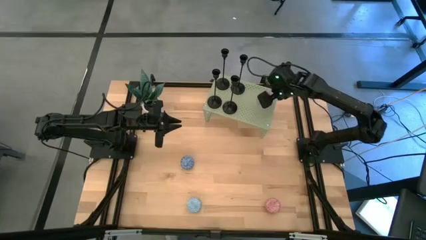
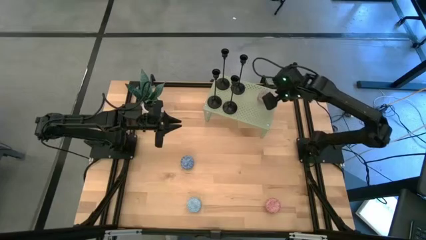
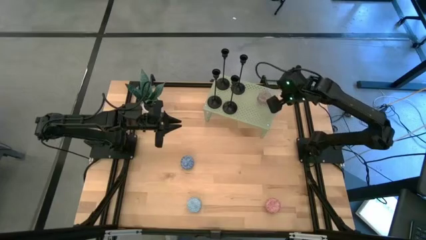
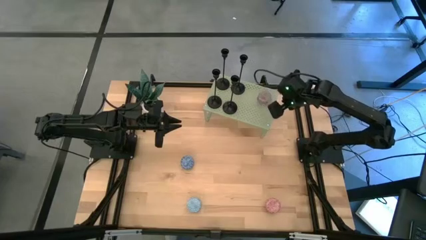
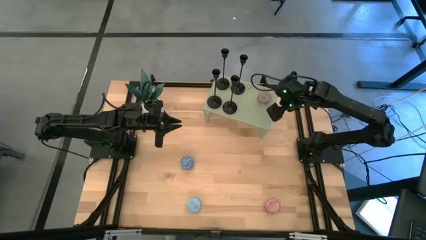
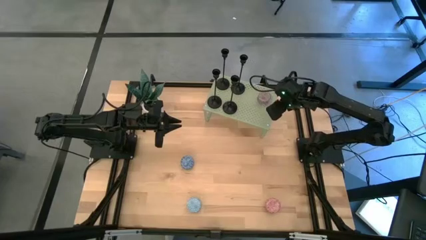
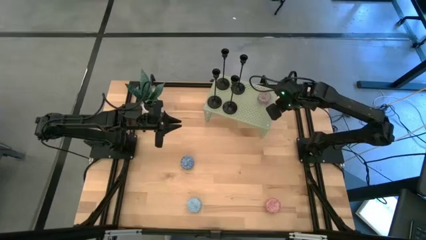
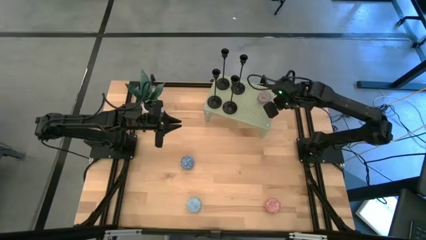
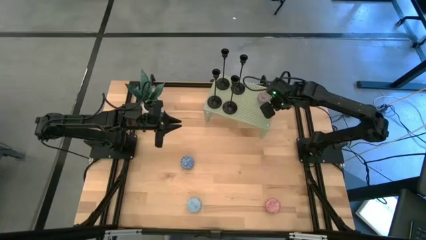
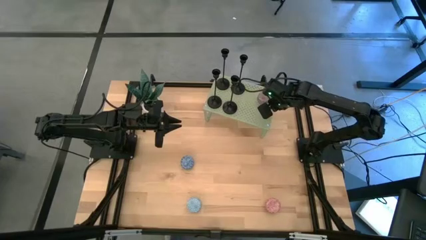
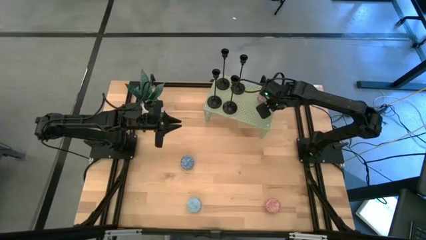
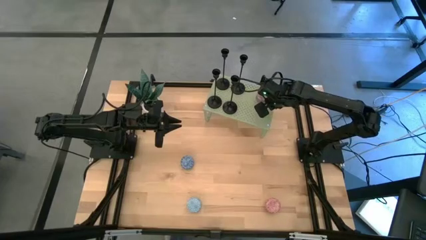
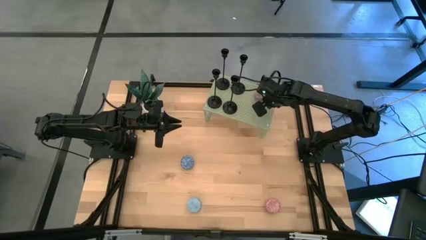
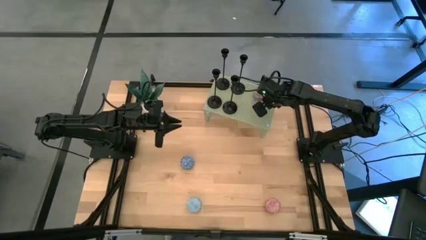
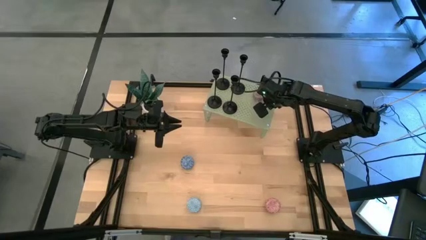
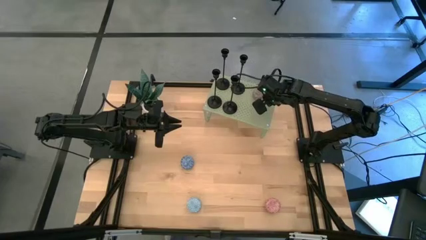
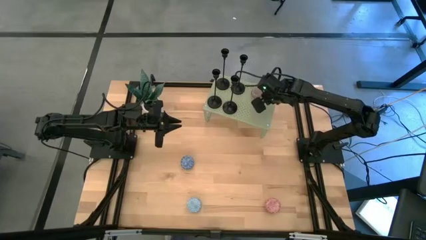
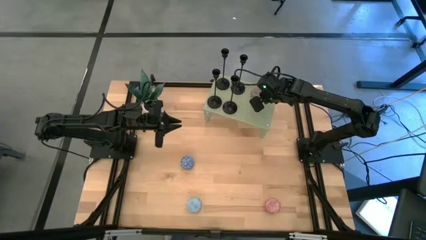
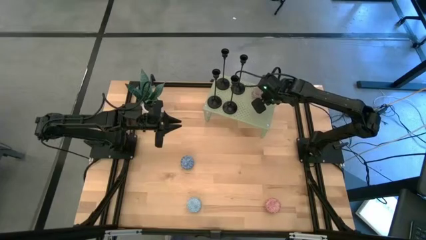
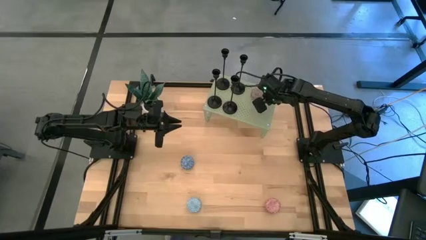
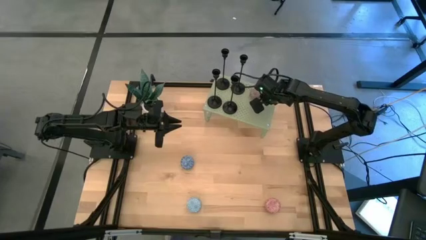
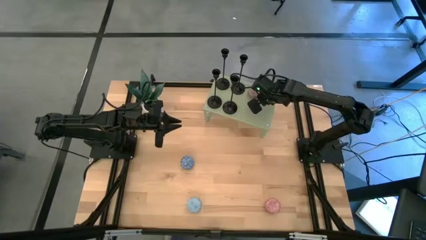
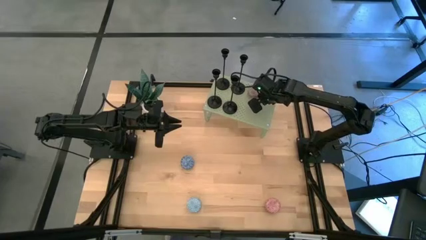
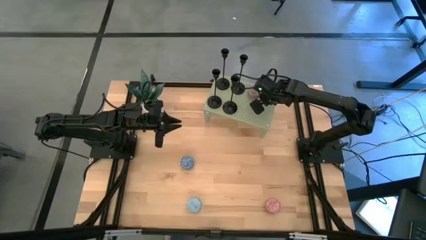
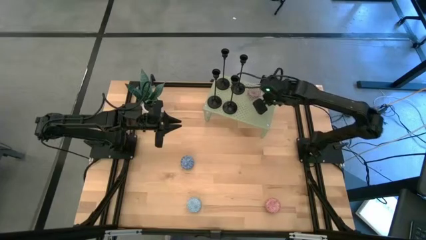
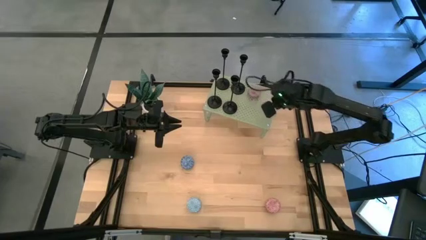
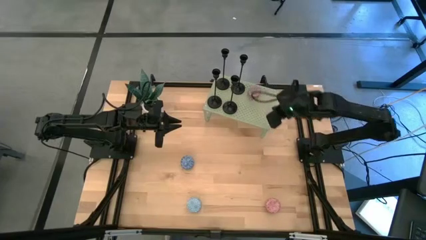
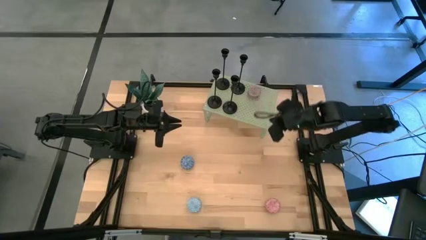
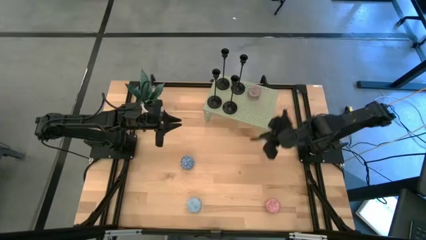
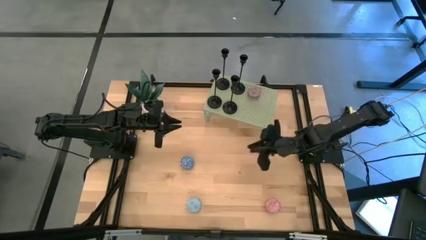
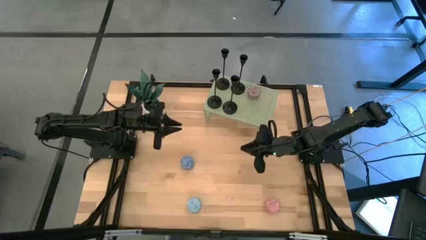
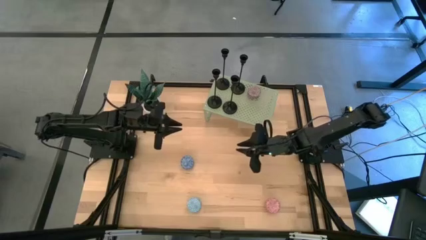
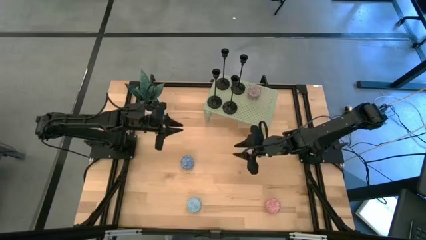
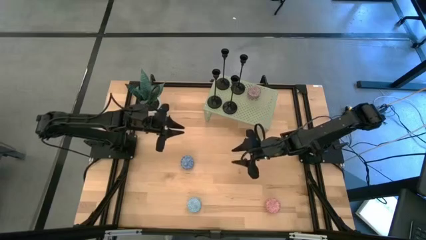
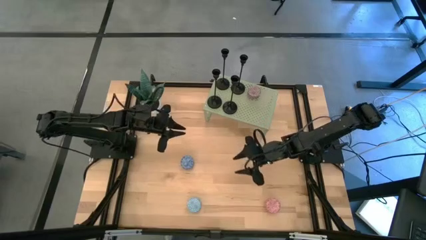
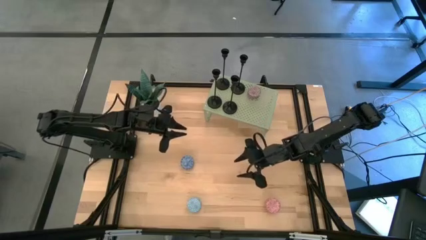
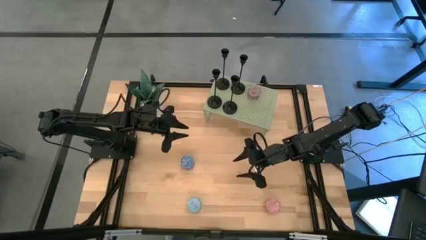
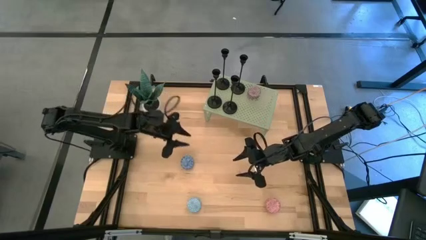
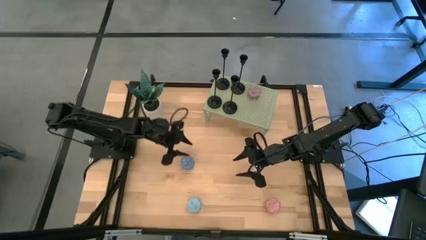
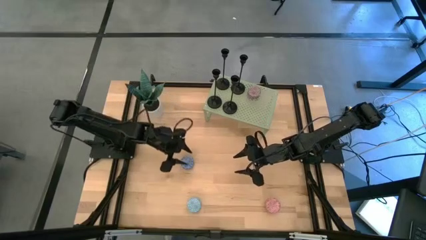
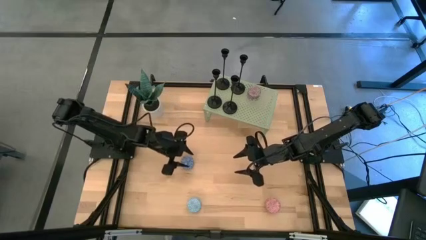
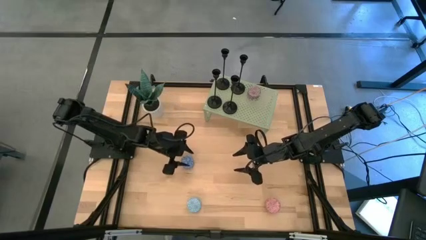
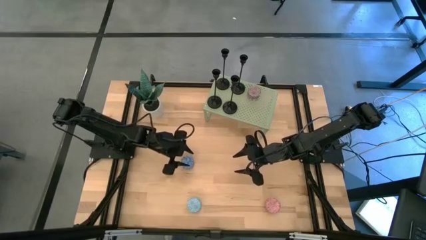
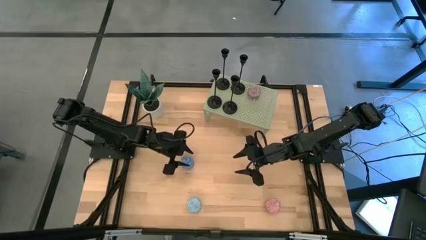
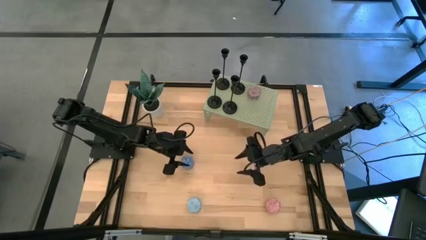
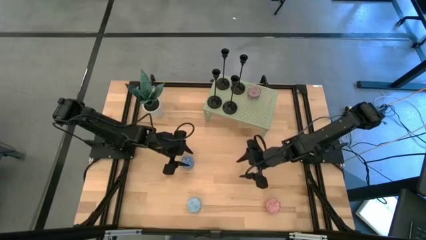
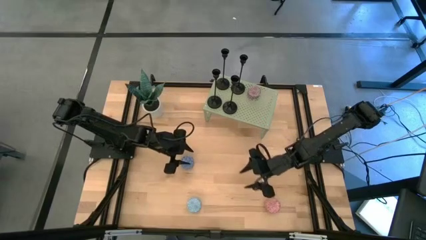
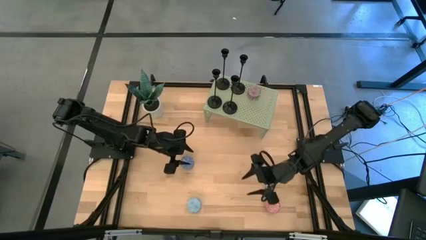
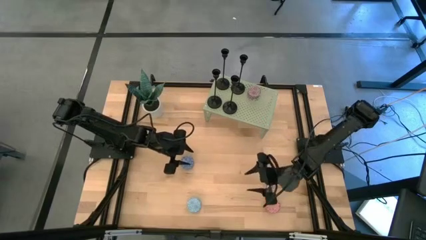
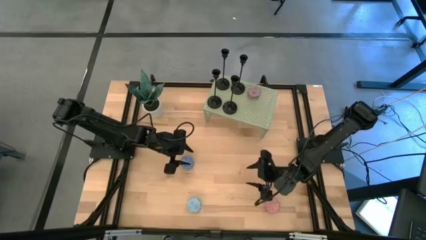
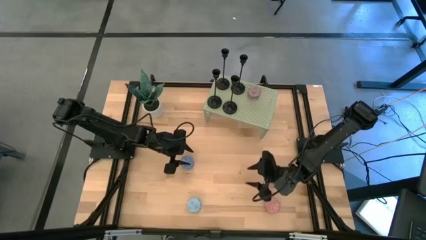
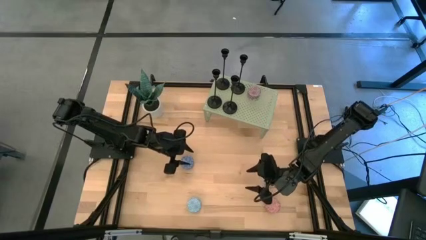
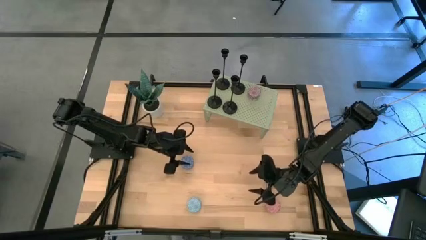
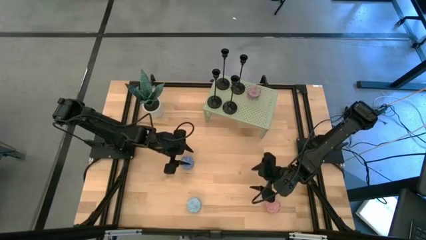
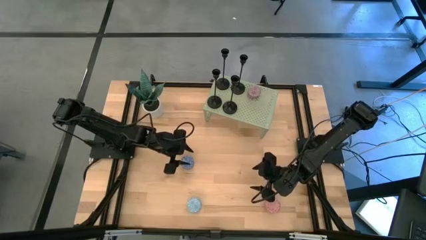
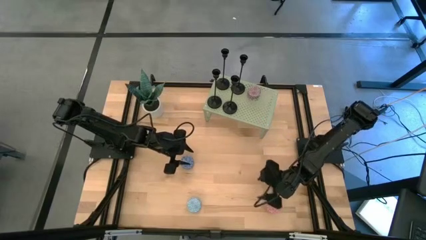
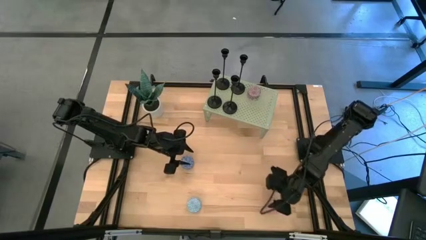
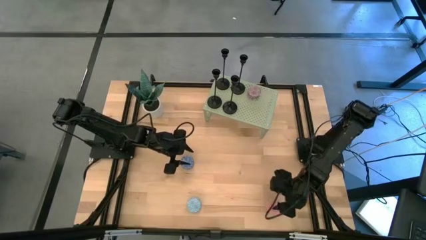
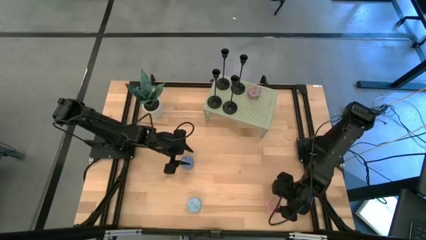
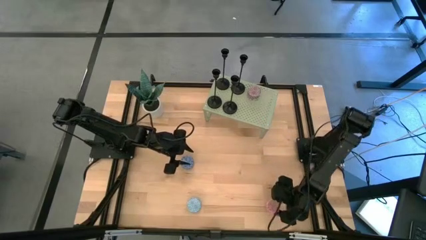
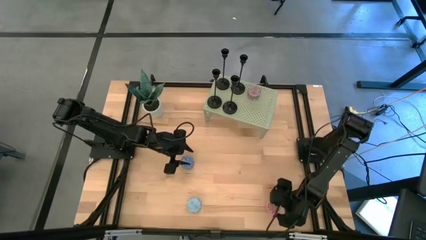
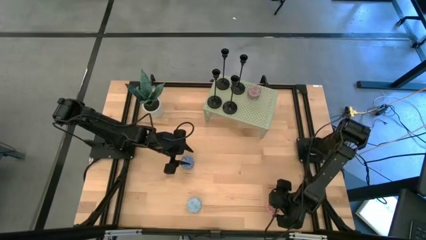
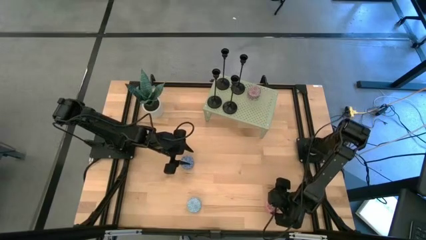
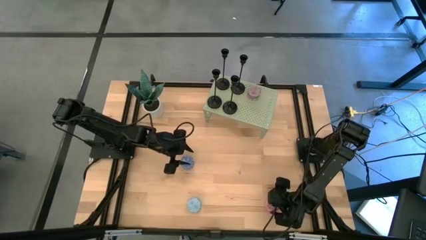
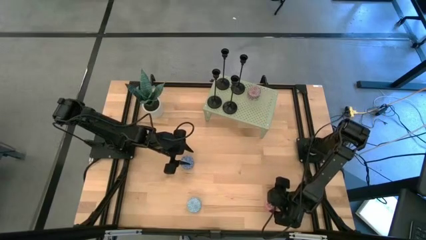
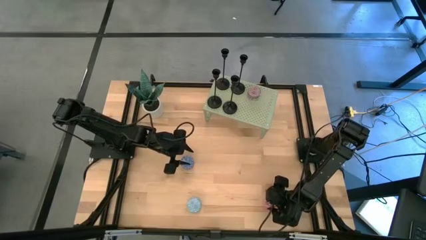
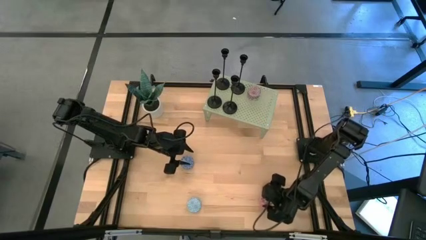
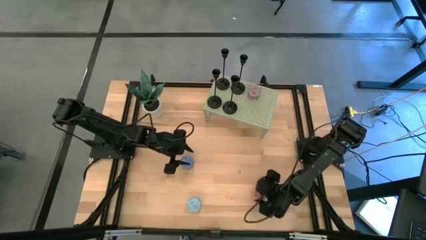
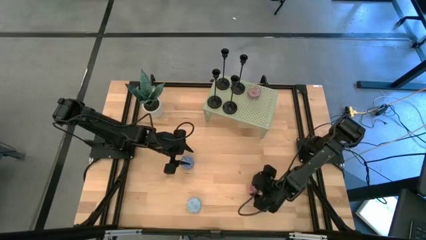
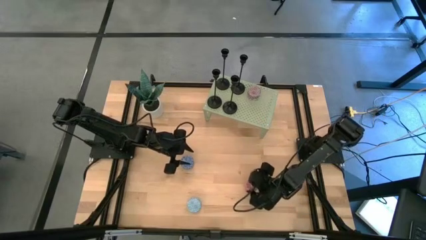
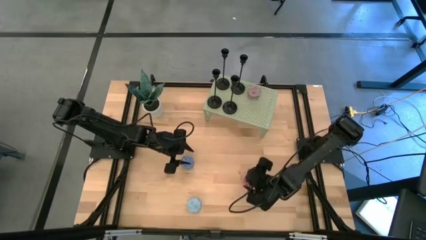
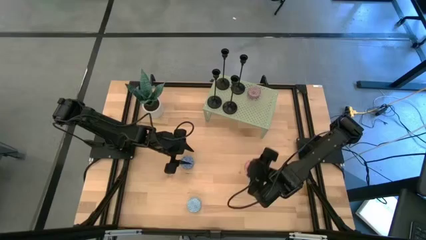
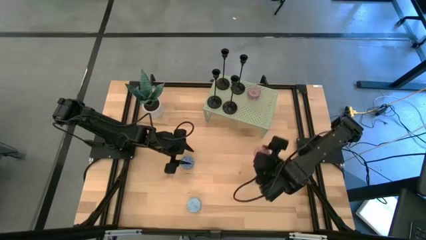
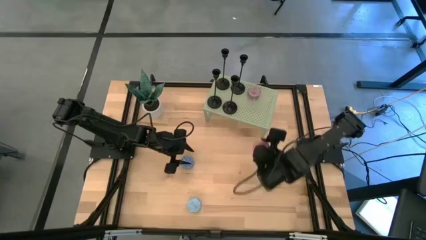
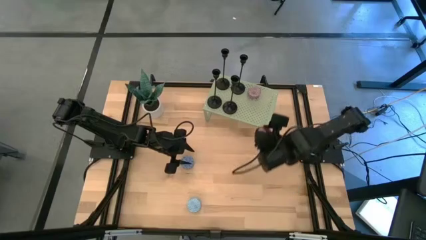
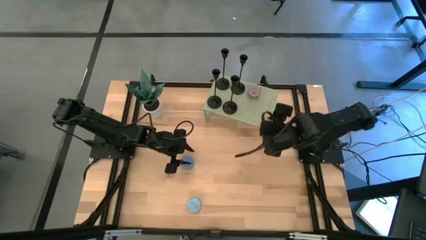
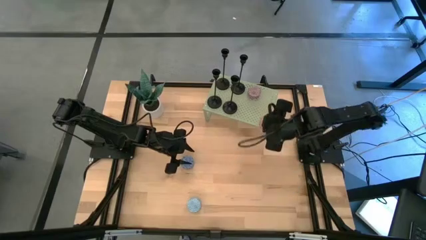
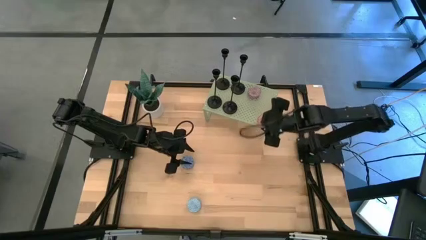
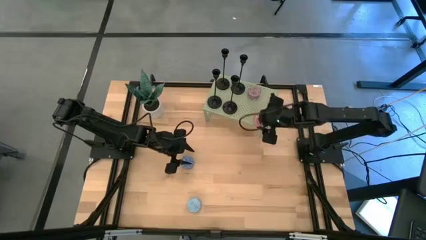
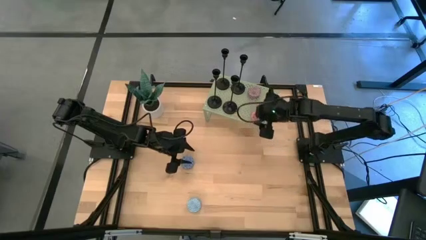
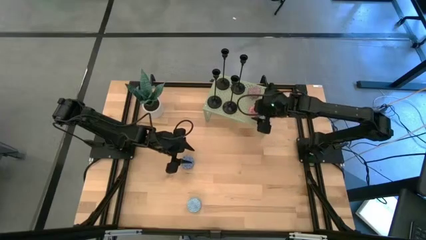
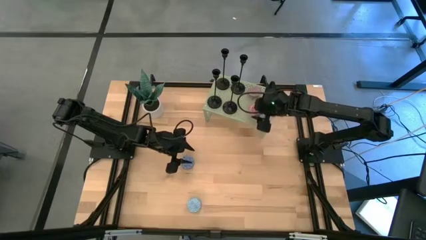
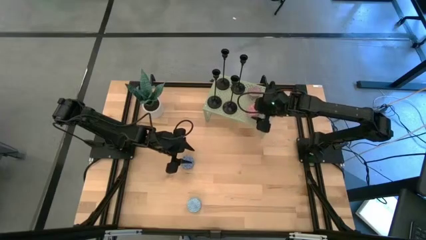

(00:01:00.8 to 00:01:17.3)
Task: Pick & Place candle stick holders
Put the pink scented candle on the shelf
